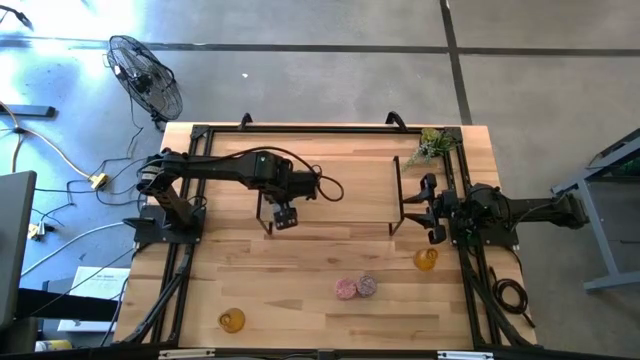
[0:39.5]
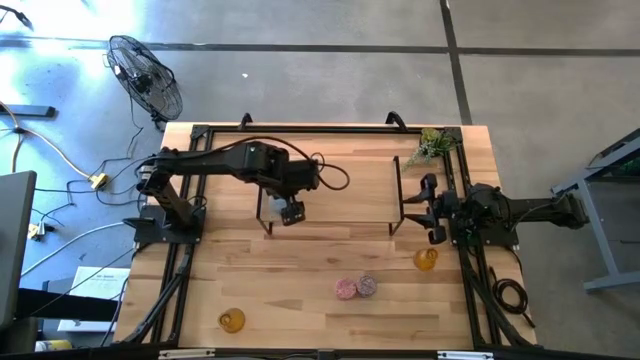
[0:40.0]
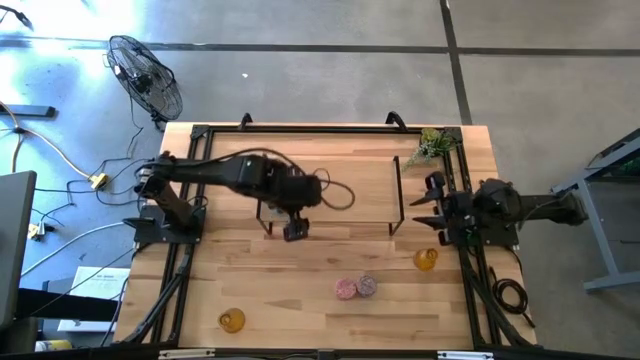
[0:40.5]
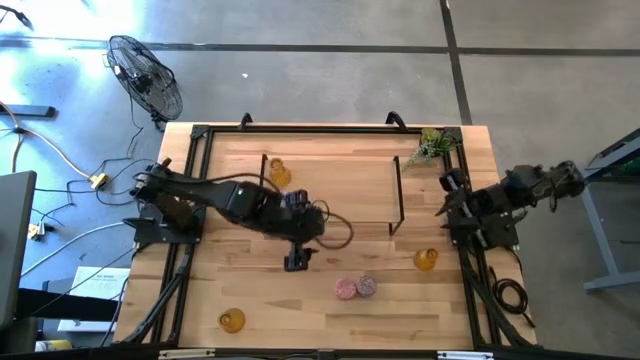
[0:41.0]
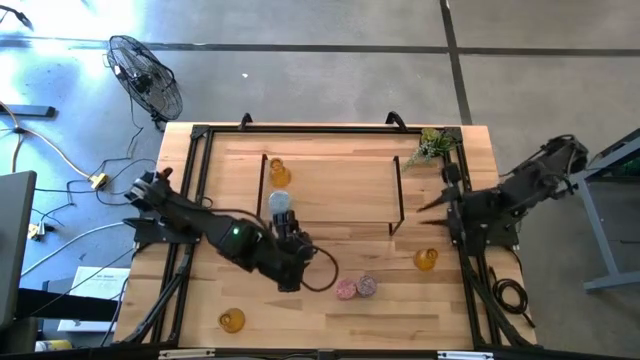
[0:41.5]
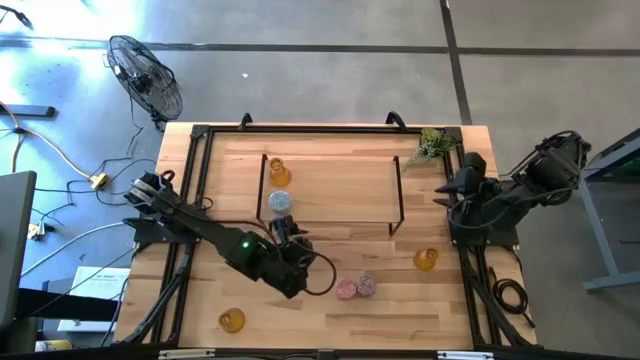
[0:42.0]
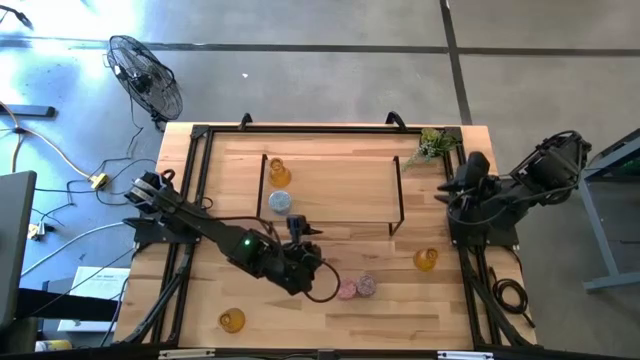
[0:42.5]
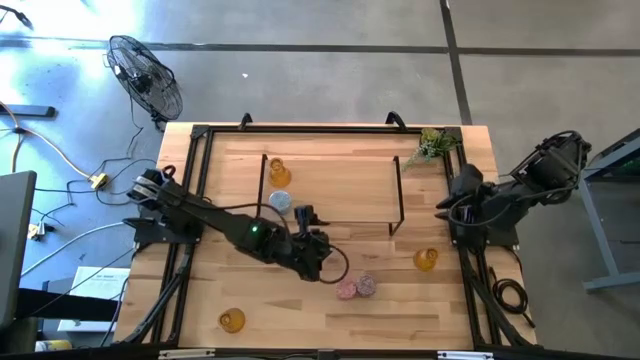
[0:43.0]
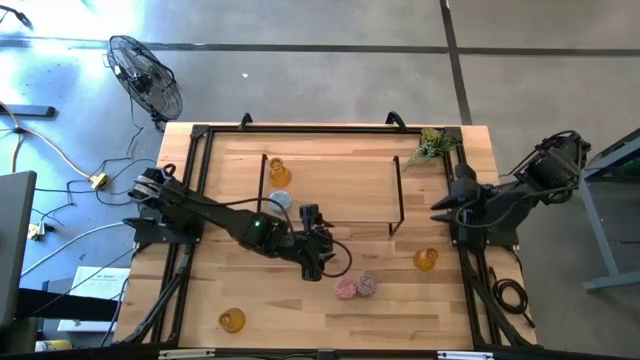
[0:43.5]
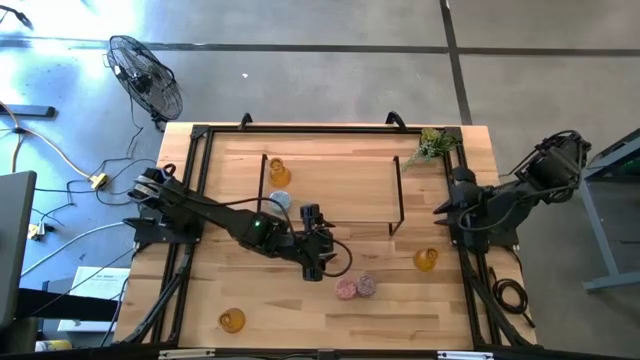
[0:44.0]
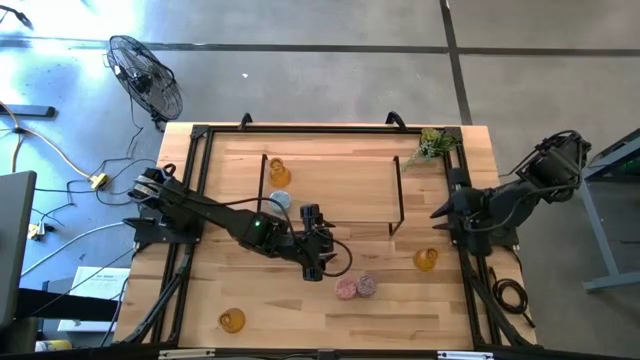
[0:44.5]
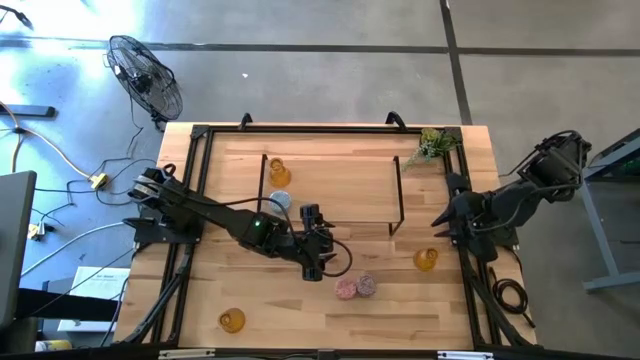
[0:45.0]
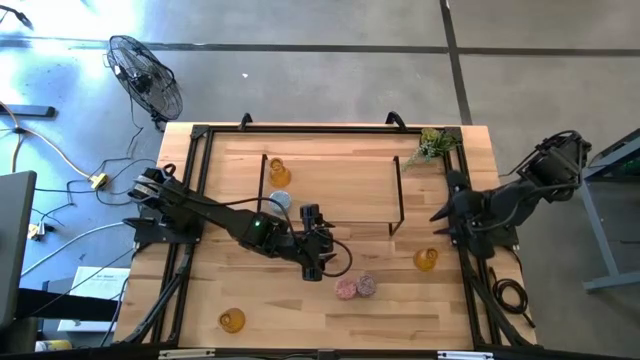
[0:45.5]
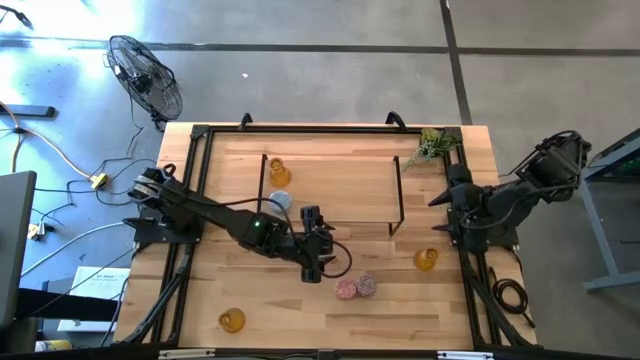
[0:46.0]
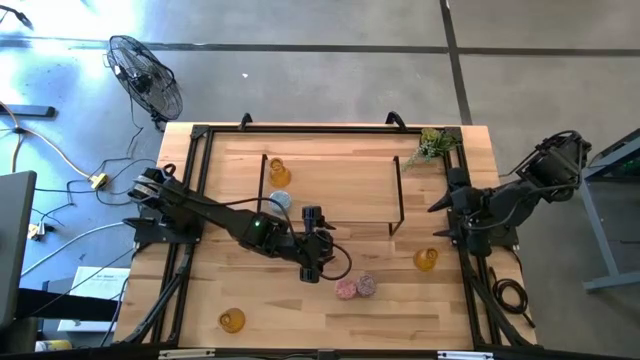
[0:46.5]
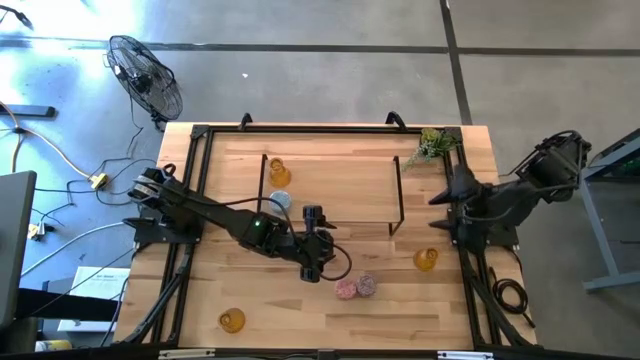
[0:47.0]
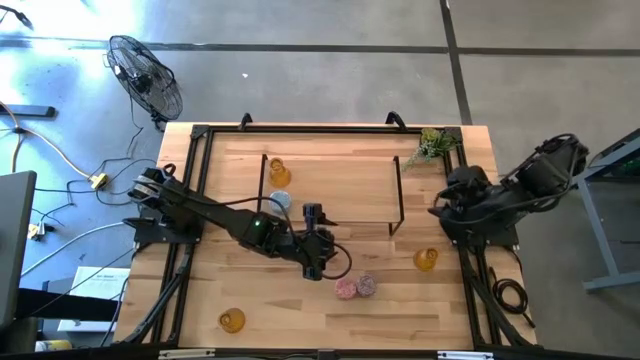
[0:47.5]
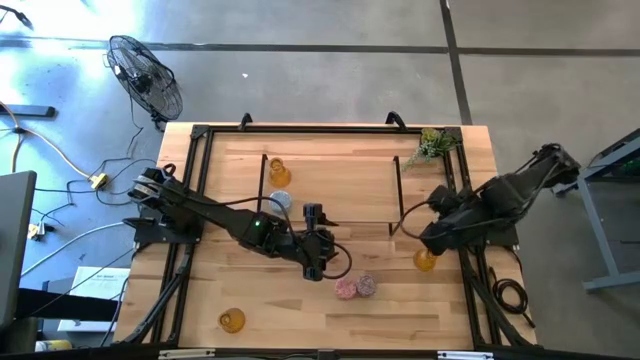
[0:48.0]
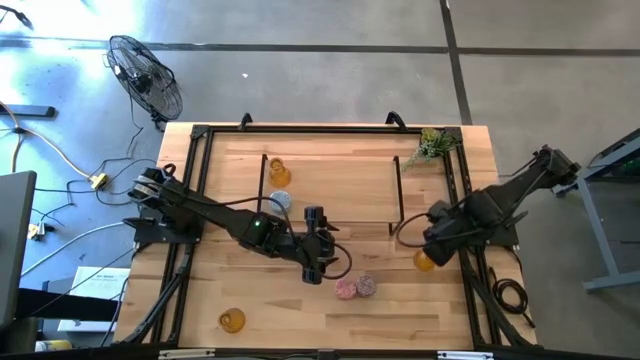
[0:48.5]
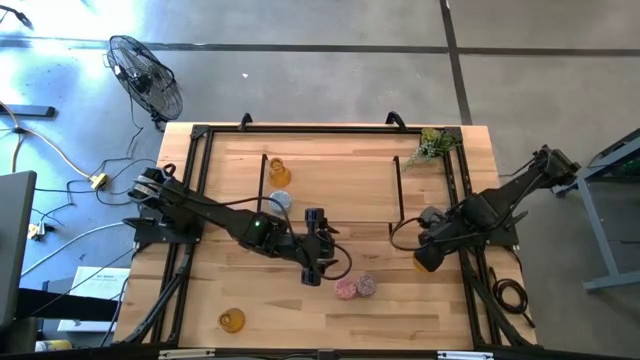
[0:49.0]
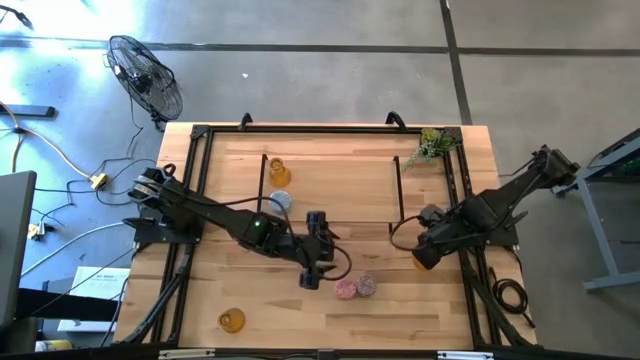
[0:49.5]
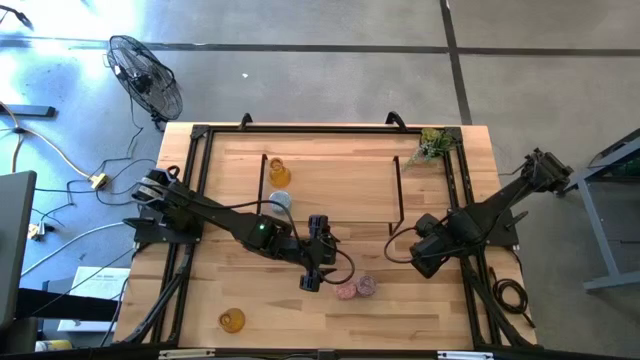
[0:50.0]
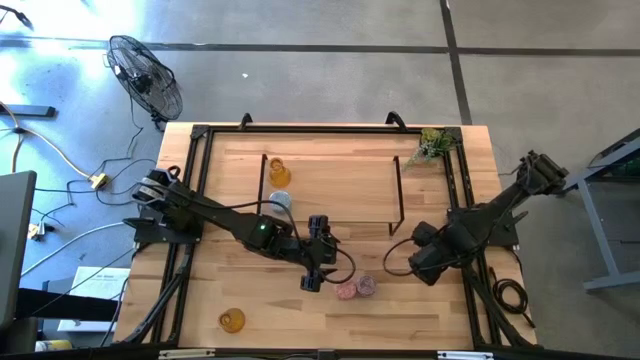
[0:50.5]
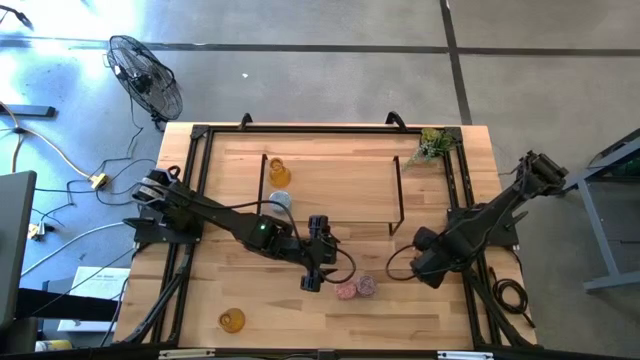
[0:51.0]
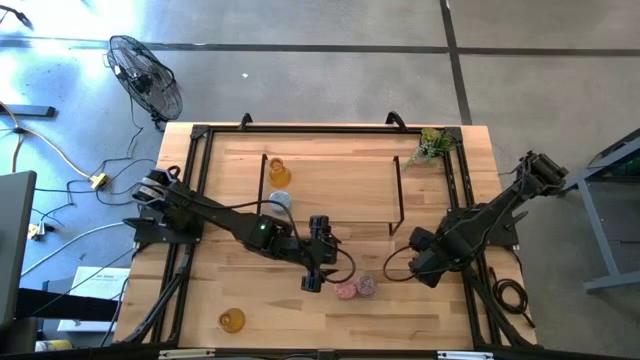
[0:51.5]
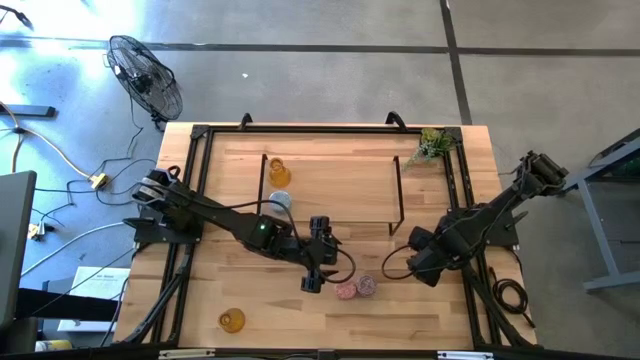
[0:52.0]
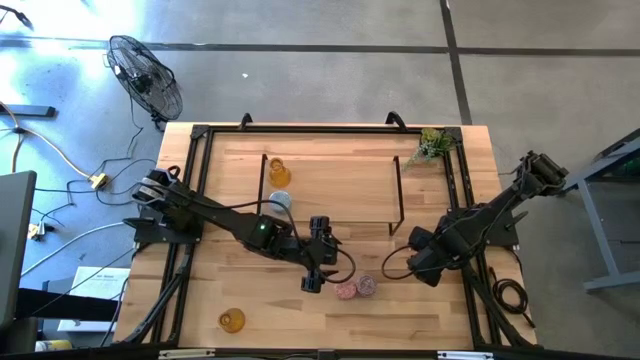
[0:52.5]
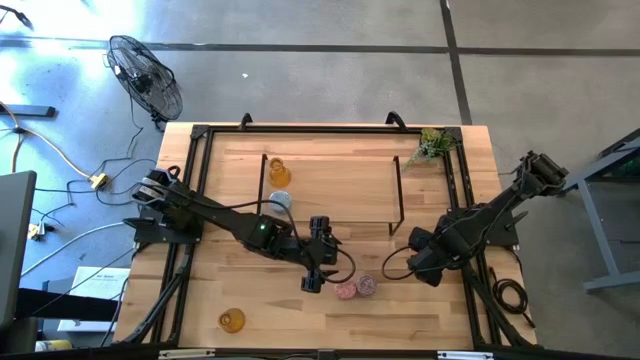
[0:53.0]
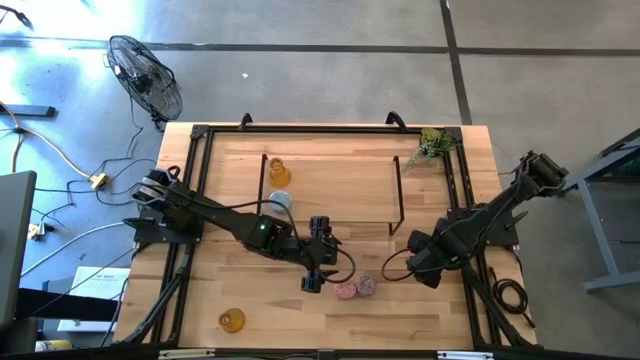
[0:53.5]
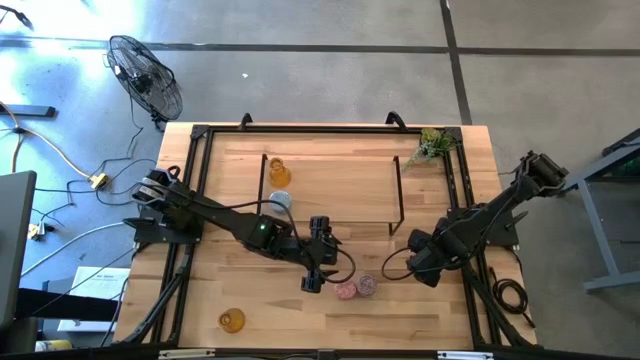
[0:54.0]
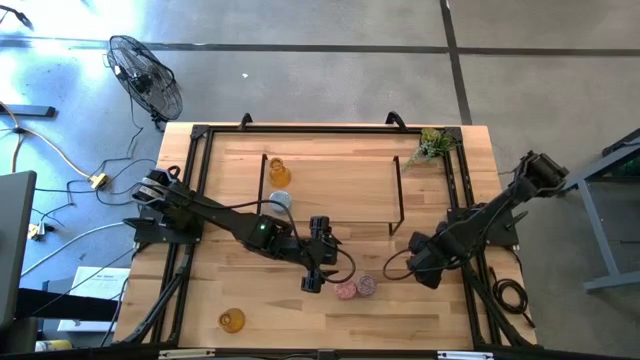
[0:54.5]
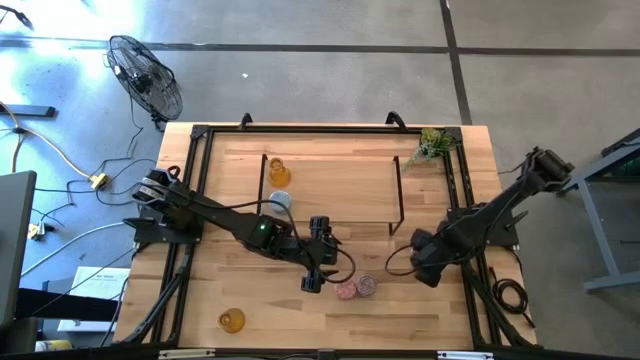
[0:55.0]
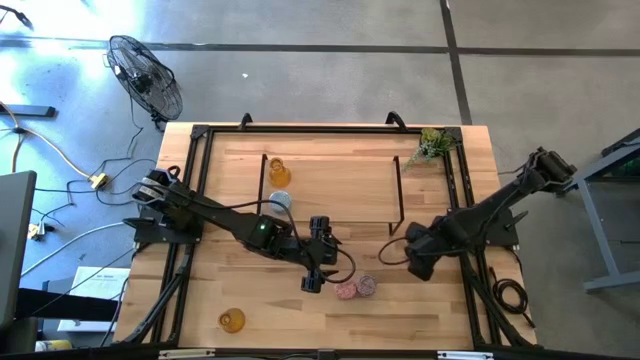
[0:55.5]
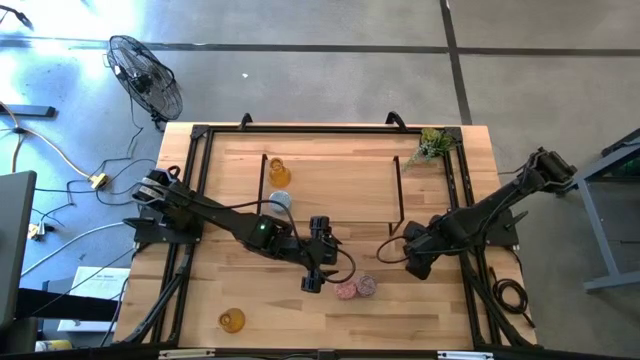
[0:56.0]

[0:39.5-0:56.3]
Task: Pick & Place candle stick holders
Put the top yellow glass candle holder on the shelf aligned with the other glass candle holder

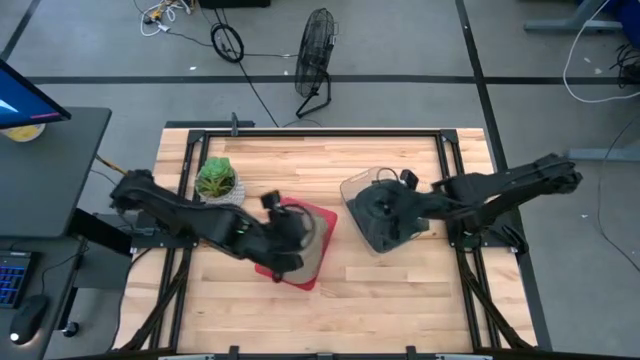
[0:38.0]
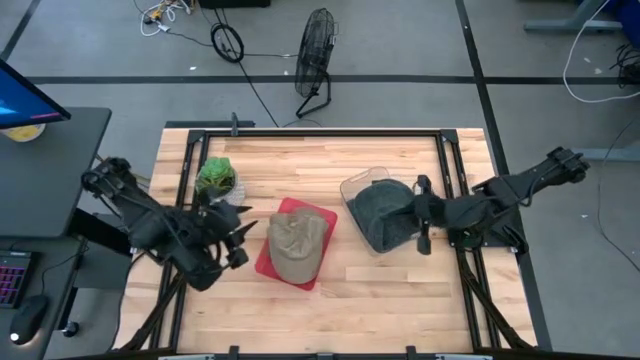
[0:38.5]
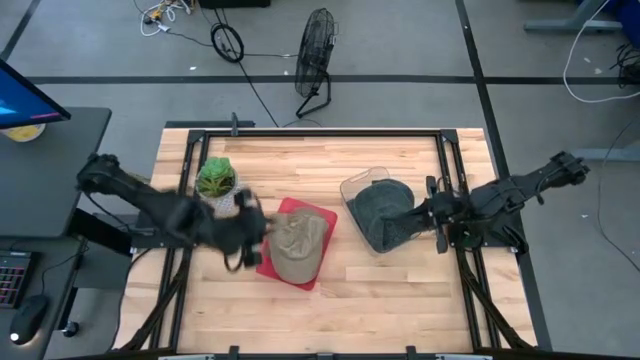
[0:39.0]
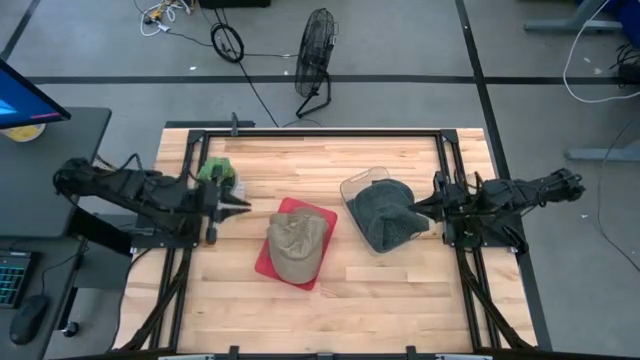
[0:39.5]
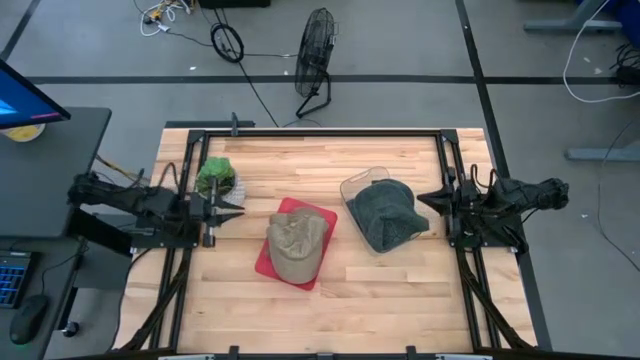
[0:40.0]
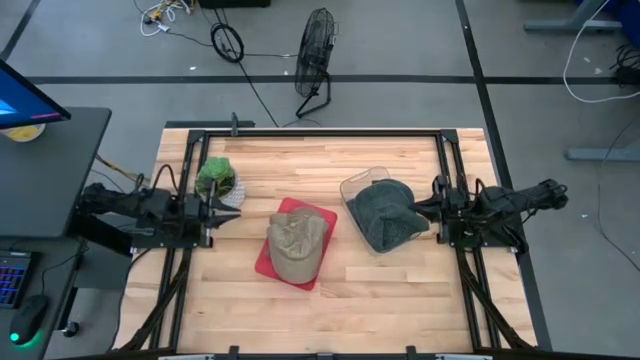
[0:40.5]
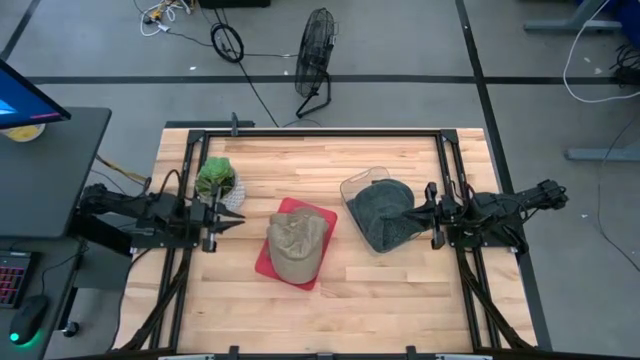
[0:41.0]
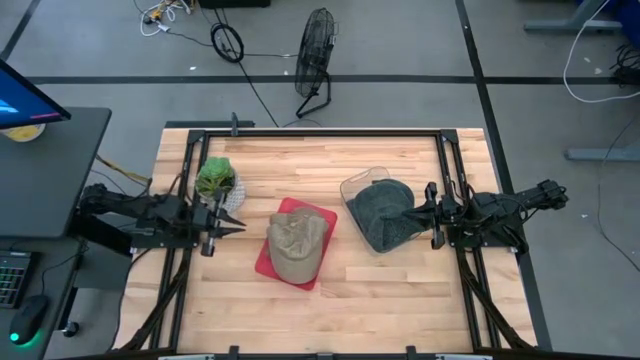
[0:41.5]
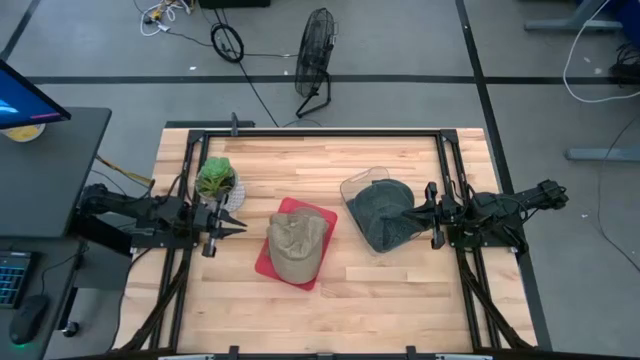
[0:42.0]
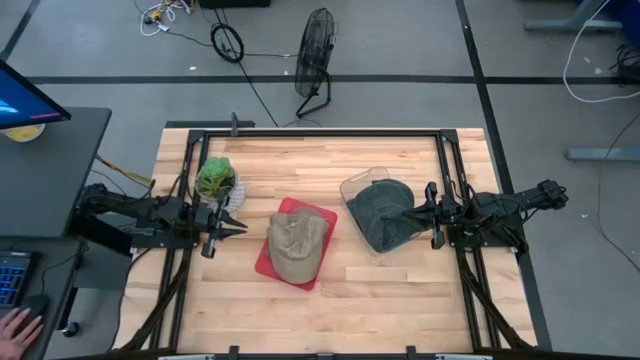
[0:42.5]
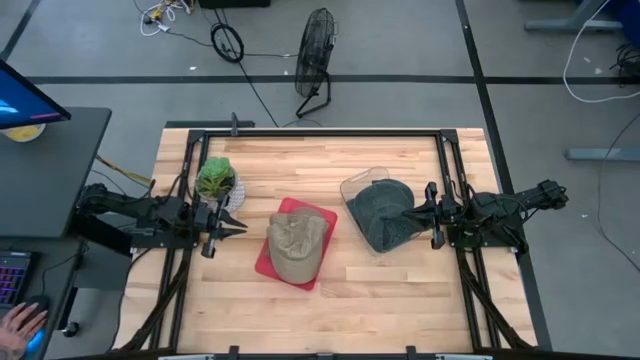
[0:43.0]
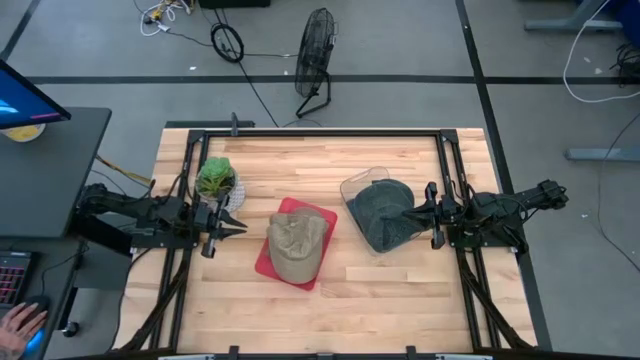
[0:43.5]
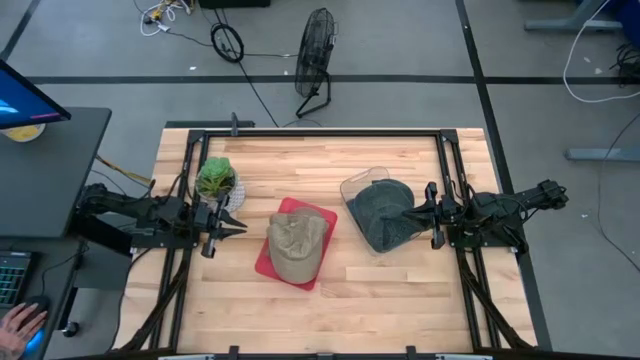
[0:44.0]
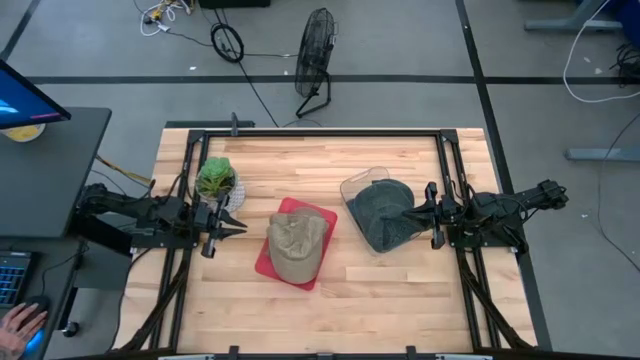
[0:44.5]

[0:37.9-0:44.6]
Task: Pick & Place hat
Return to Home Position
